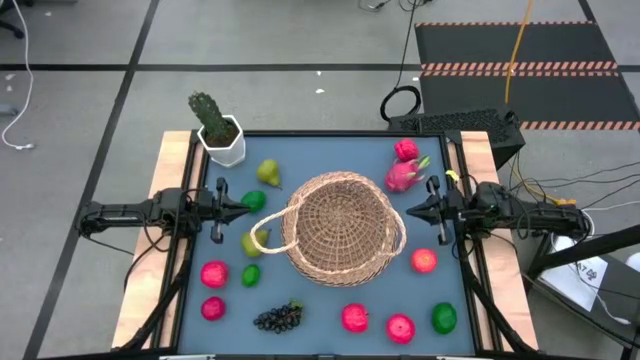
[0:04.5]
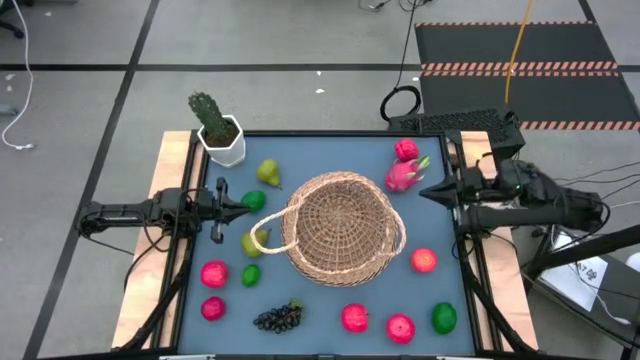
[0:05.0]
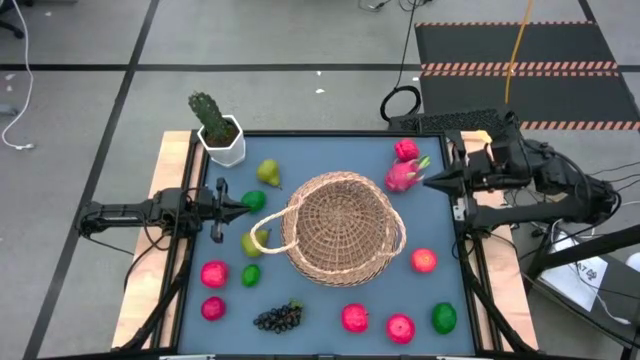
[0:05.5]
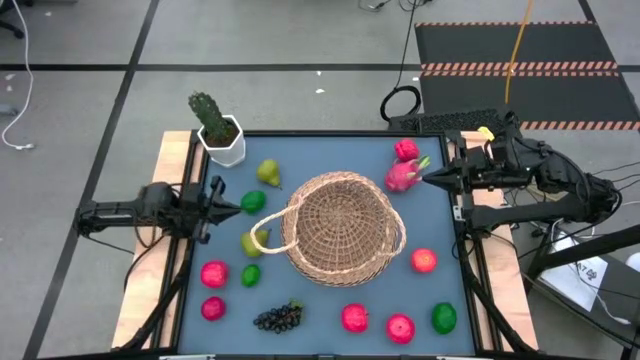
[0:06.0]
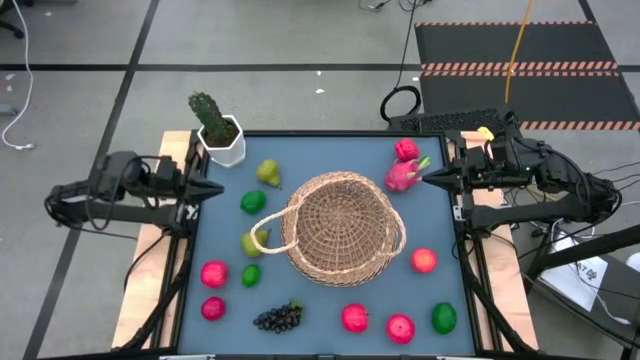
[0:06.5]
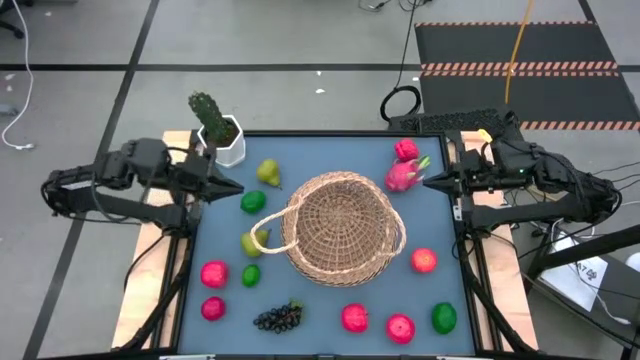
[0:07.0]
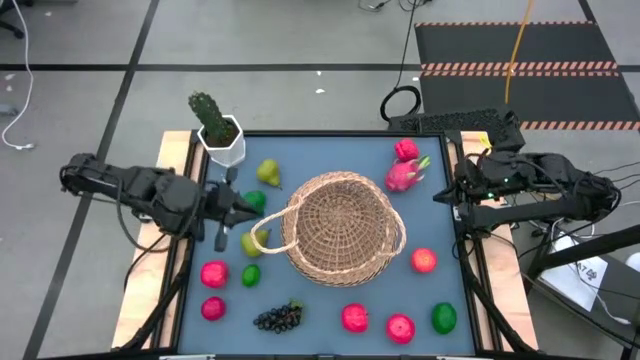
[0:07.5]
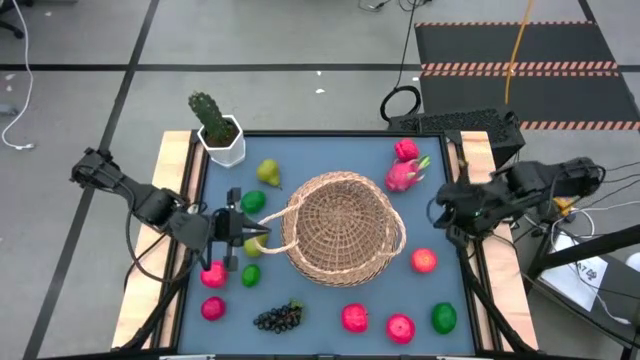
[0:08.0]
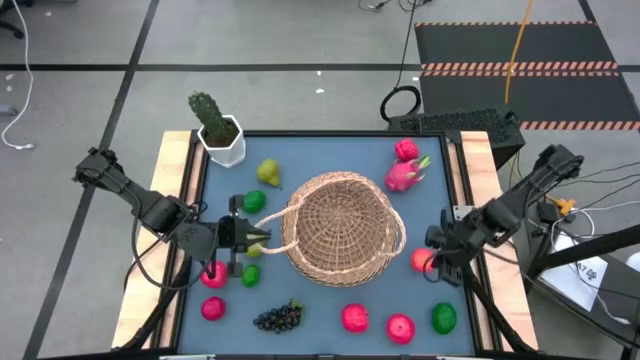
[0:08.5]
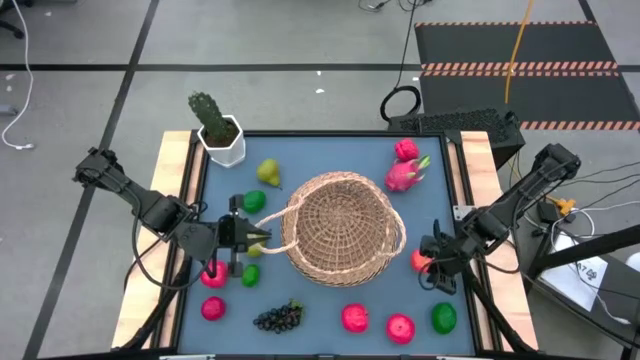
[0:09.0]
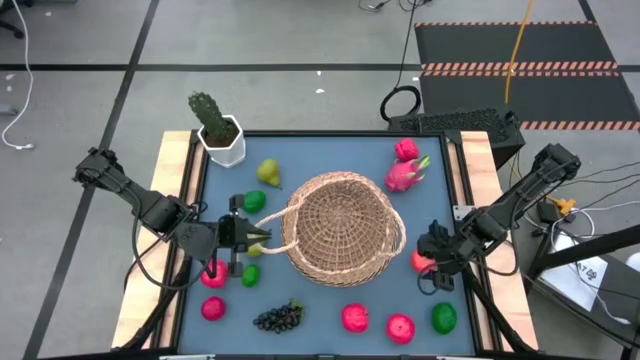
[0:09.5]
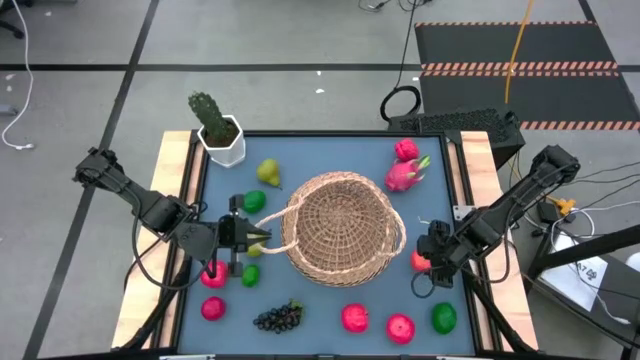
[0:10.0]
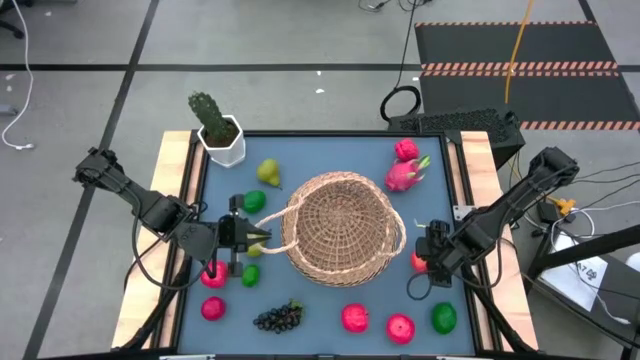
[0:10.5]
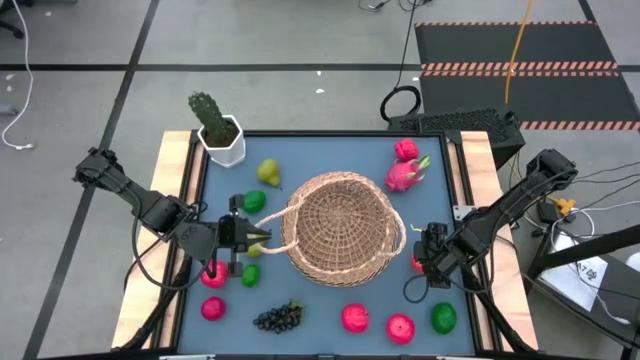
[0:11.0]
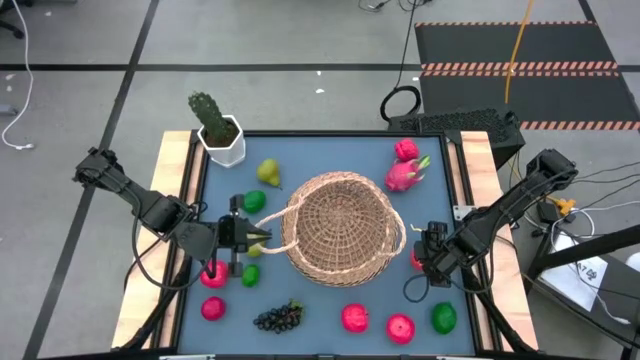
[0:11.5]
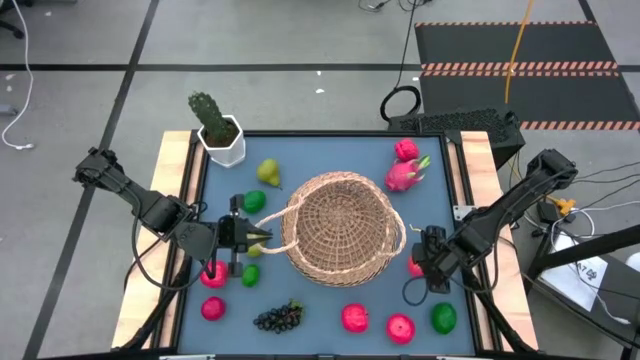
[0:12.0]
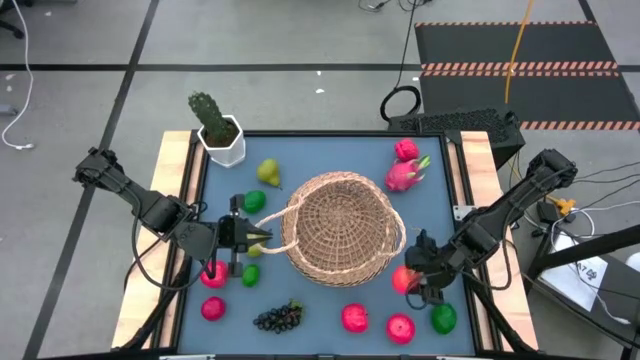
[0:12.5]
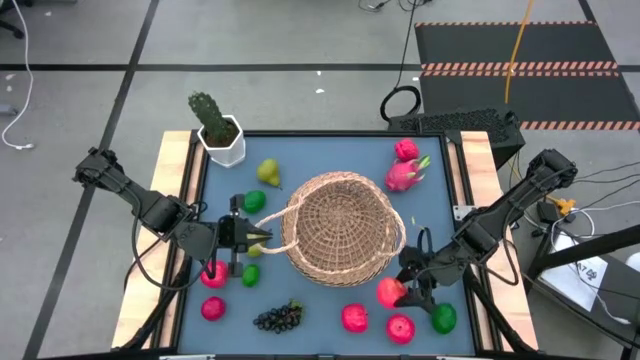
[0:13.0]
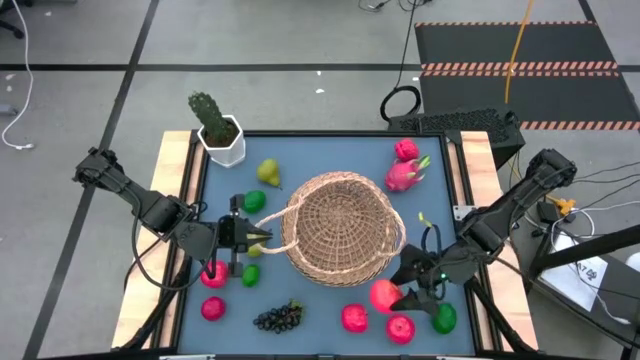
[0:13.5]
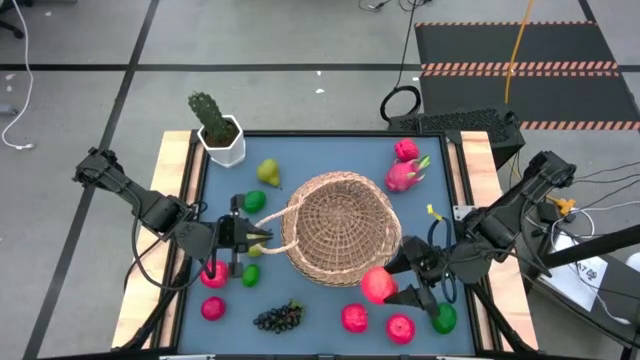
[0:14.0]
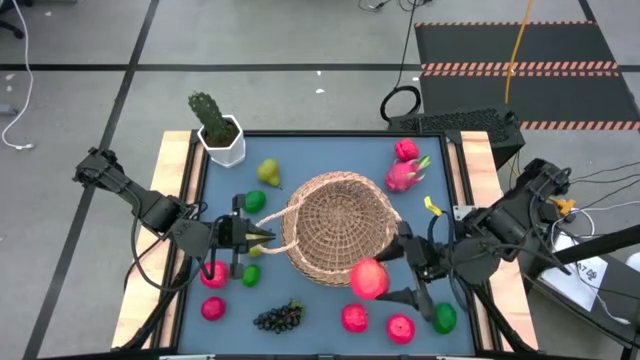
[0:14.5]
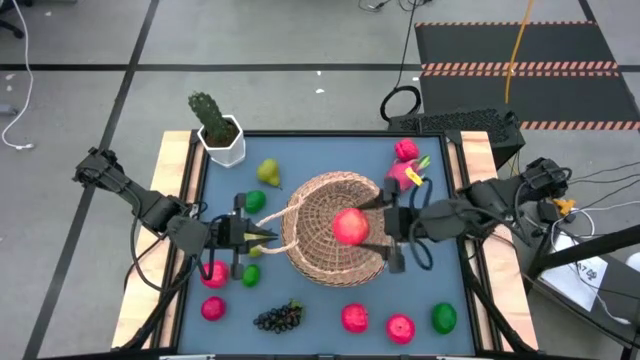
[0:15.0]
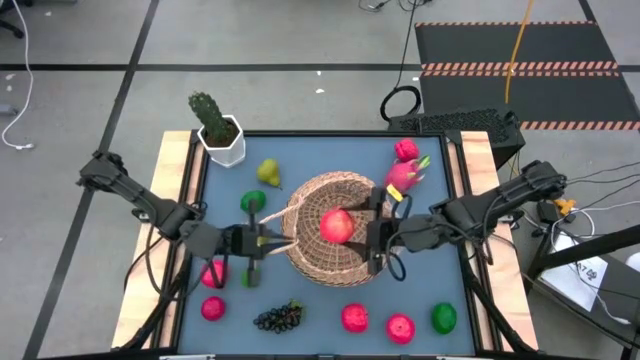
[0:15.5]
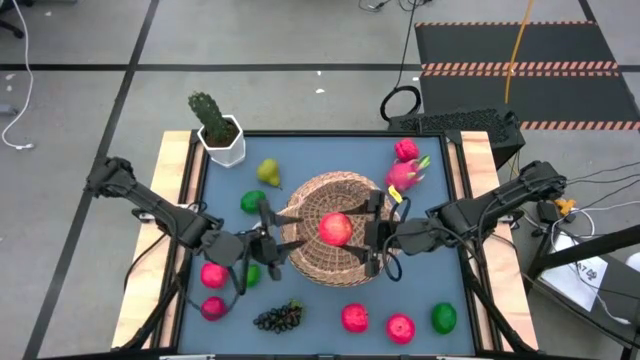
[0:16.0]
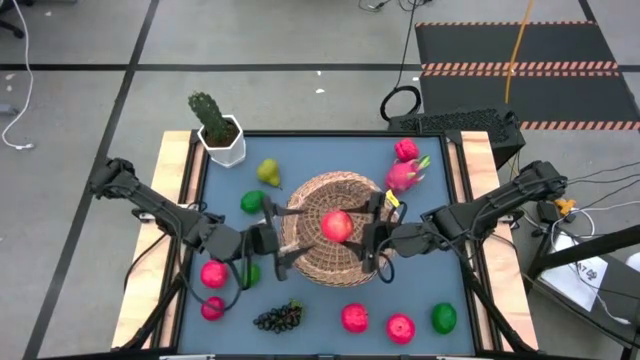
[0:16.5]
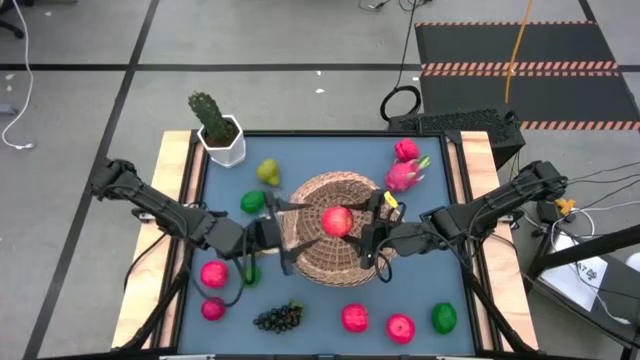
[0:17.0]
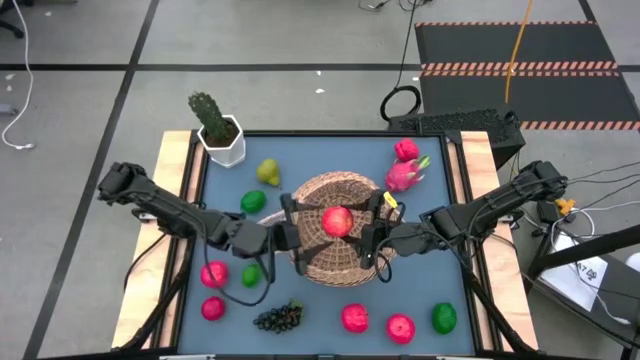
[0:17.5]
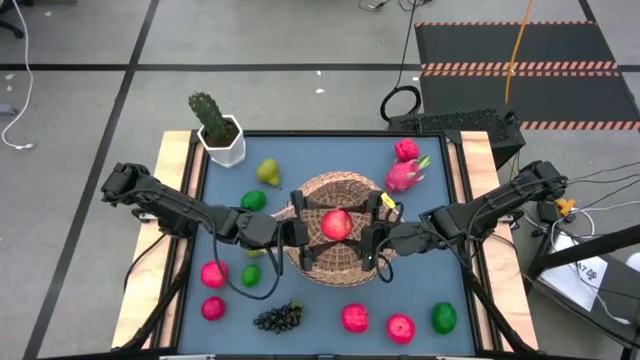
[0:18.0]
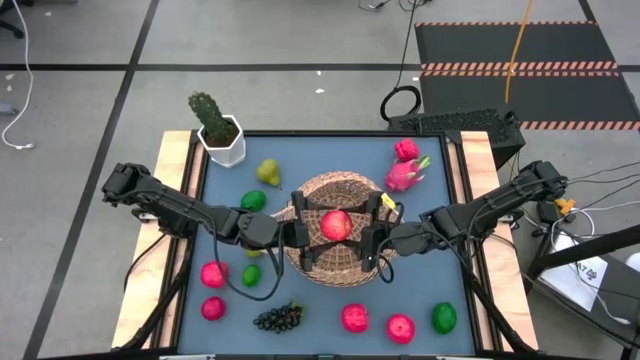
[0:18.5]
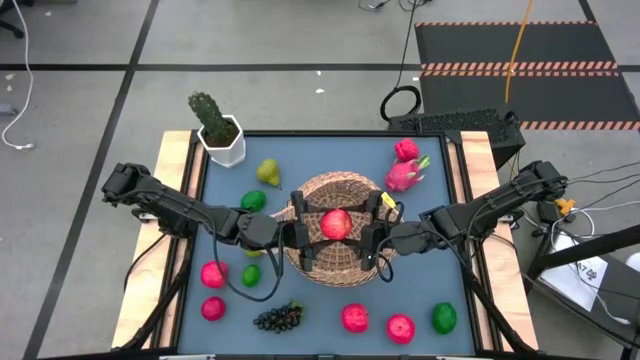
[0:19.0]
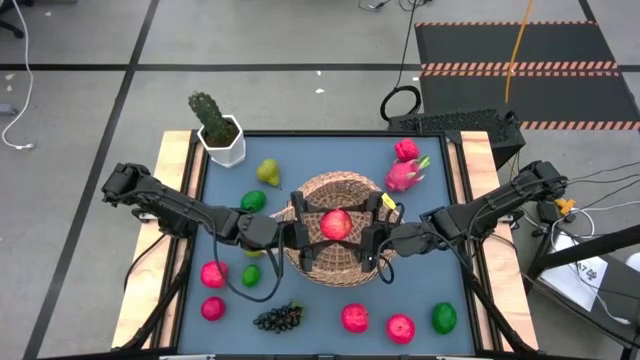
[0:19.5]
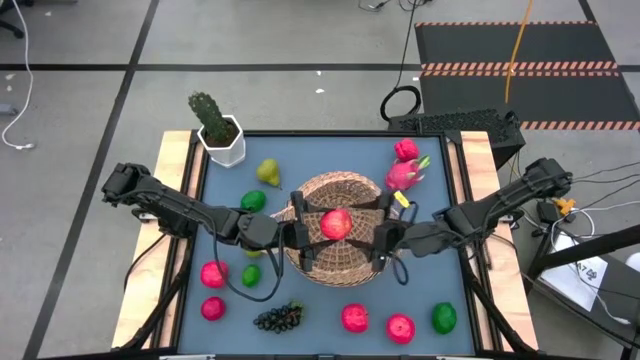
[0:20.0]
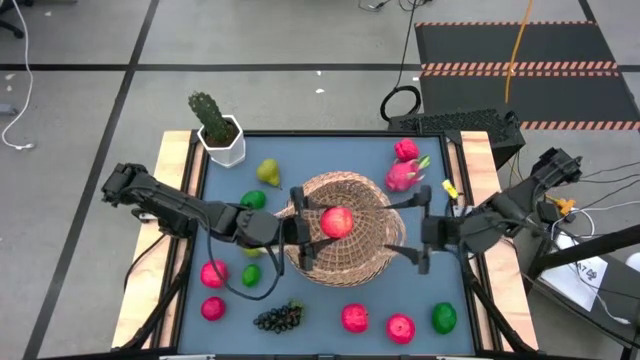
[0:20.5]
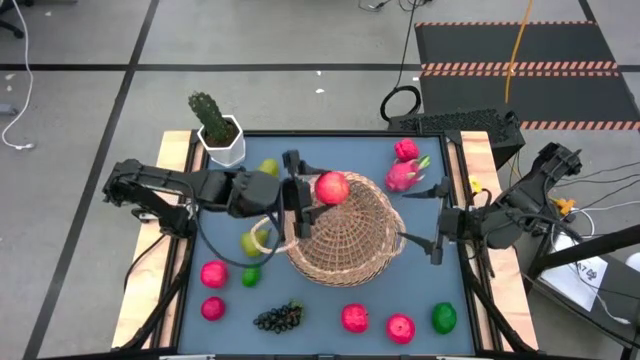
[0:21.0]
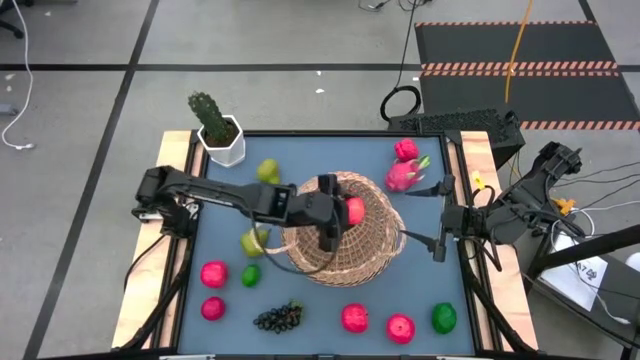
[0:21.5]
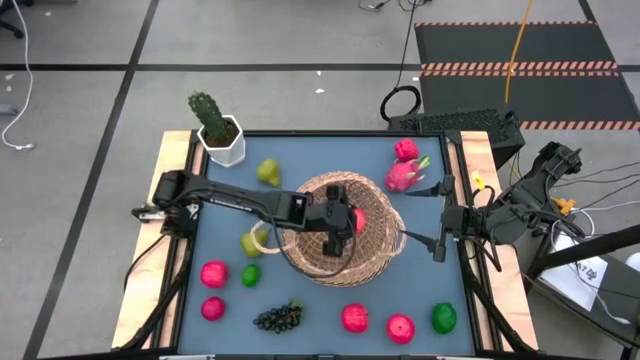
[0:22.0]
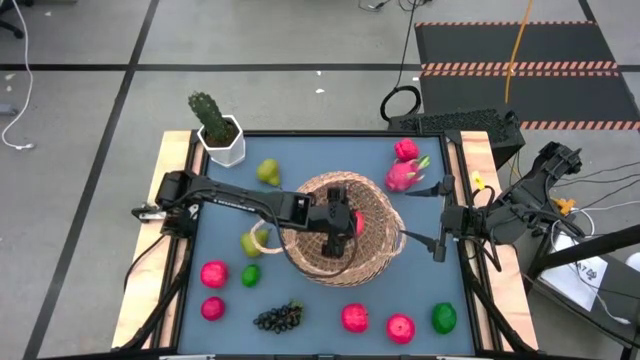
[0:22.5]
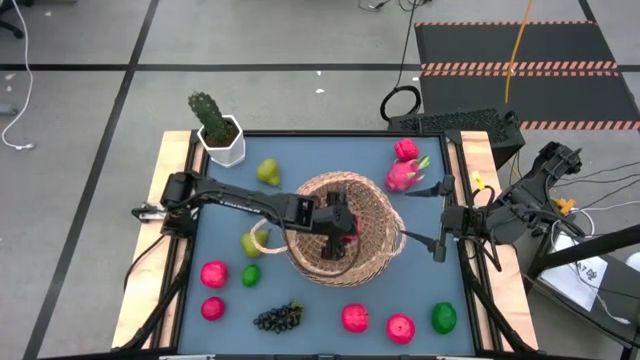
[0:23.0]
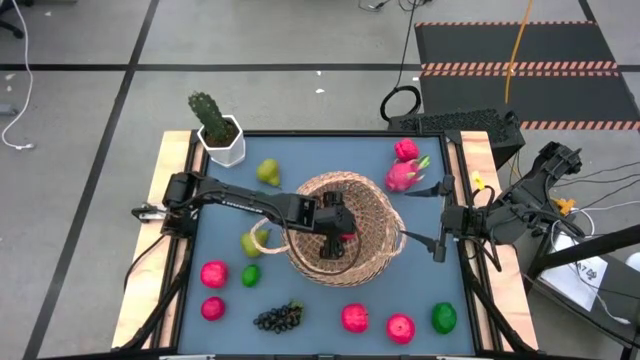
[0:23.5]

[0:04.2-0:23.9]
Task: Build produce basket
Put the red apple into the brown basket
